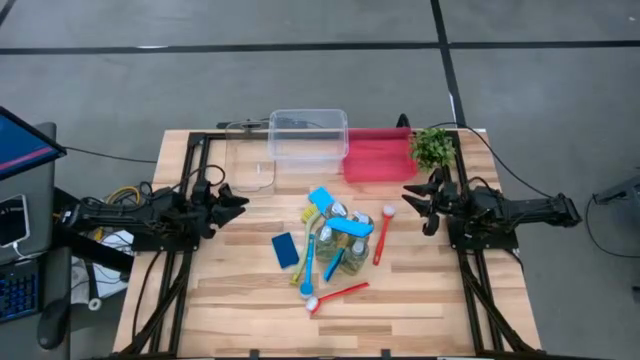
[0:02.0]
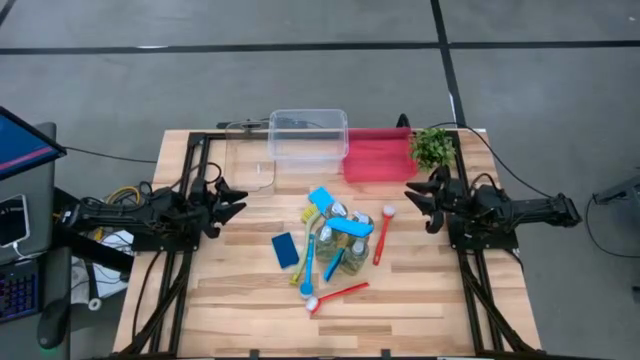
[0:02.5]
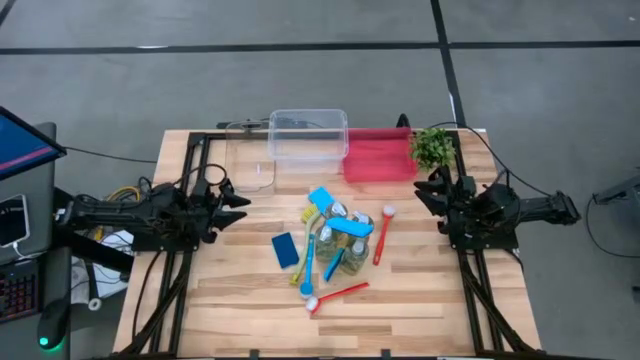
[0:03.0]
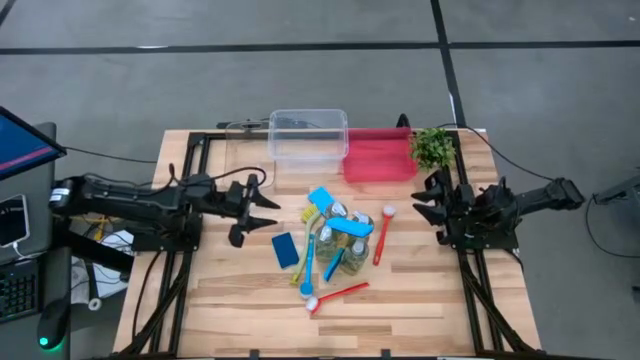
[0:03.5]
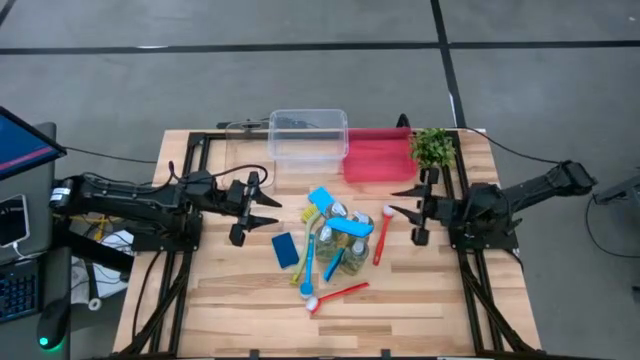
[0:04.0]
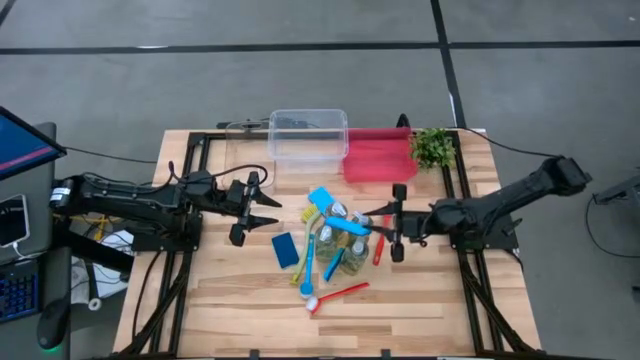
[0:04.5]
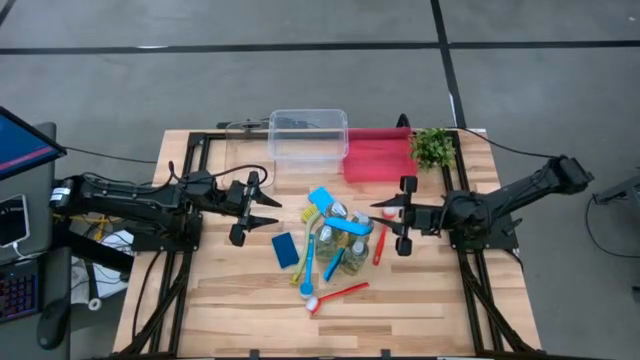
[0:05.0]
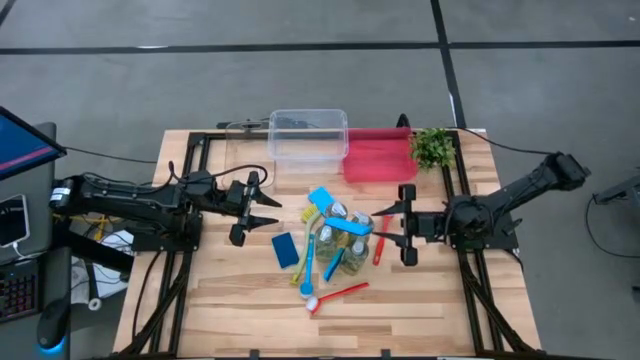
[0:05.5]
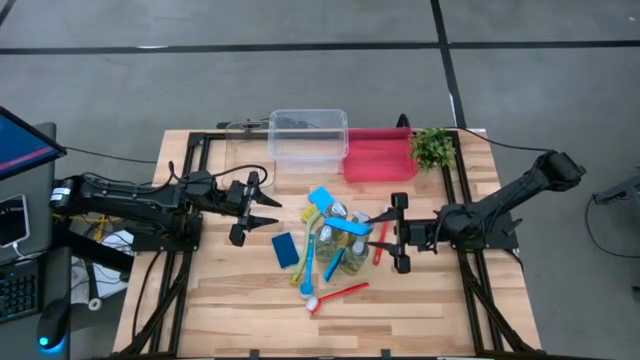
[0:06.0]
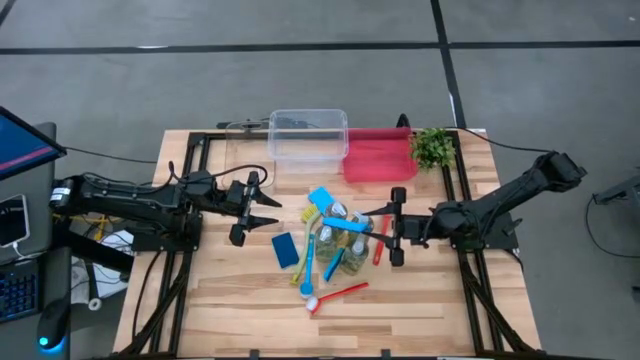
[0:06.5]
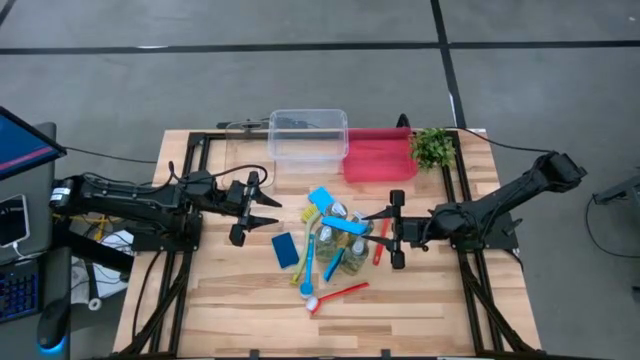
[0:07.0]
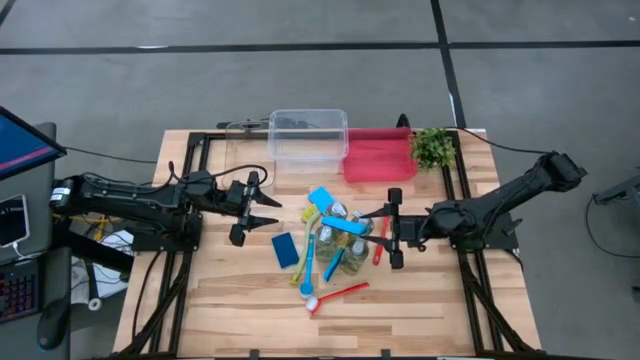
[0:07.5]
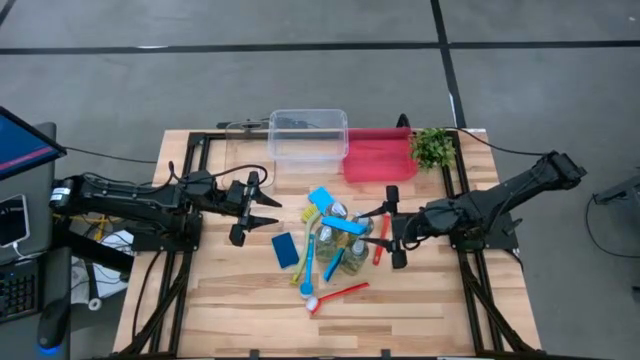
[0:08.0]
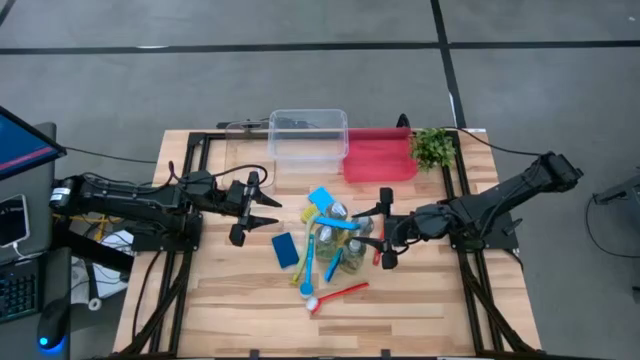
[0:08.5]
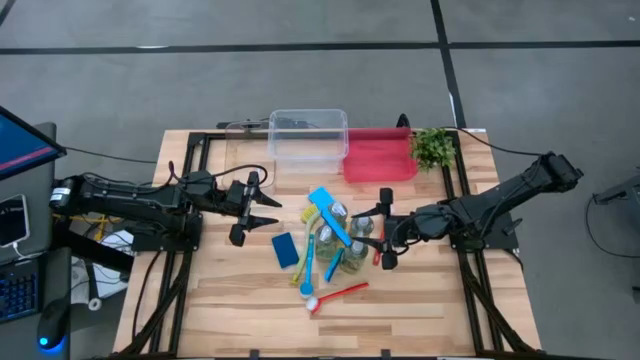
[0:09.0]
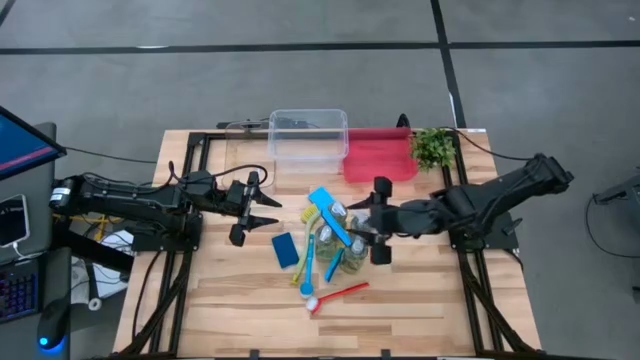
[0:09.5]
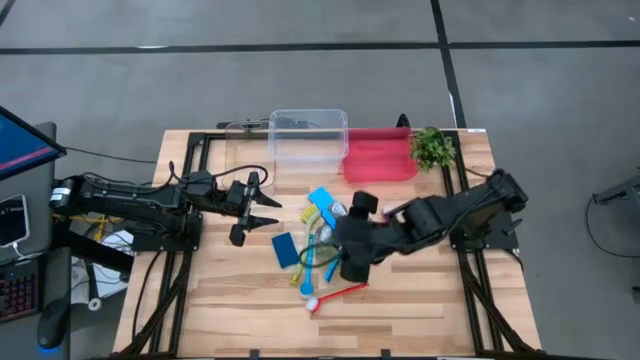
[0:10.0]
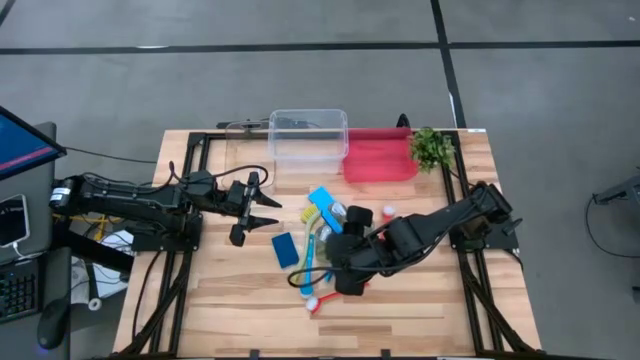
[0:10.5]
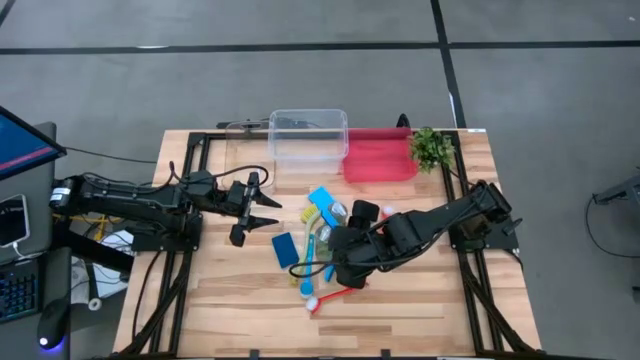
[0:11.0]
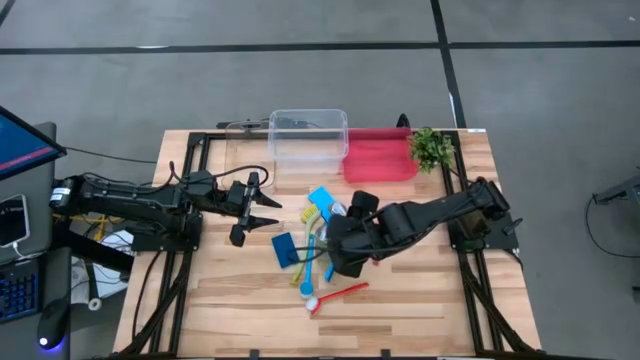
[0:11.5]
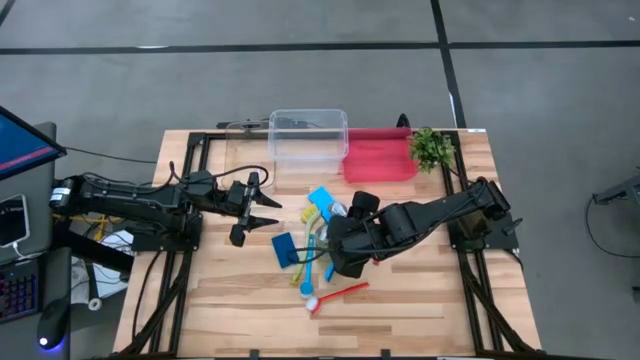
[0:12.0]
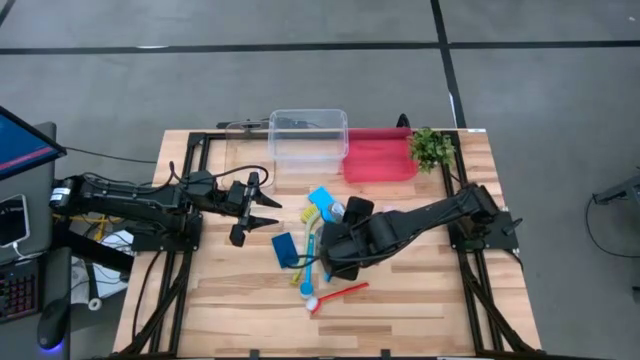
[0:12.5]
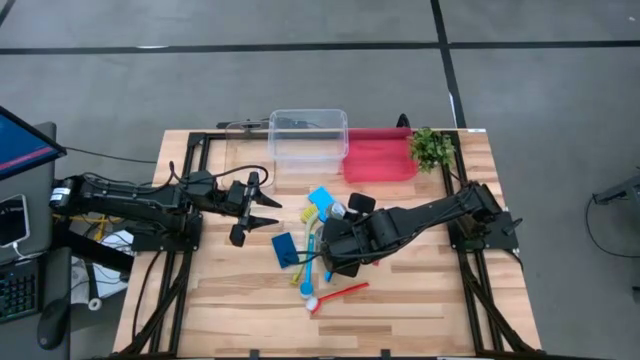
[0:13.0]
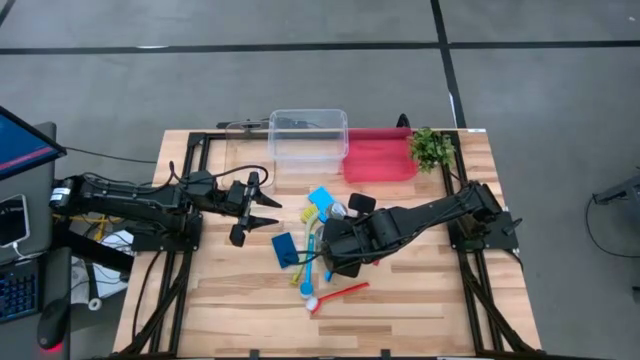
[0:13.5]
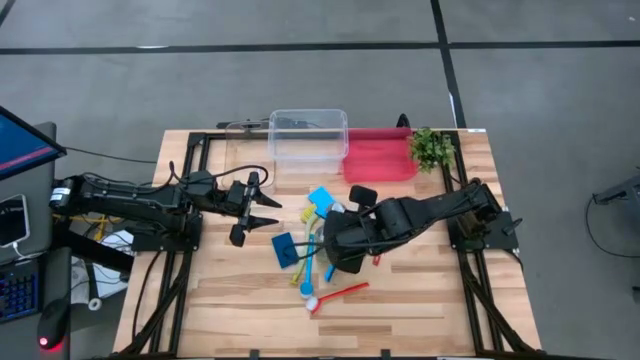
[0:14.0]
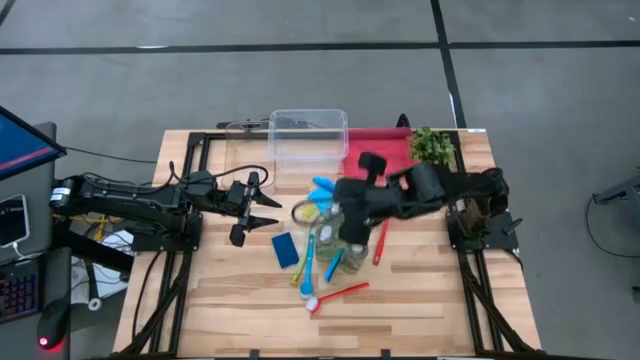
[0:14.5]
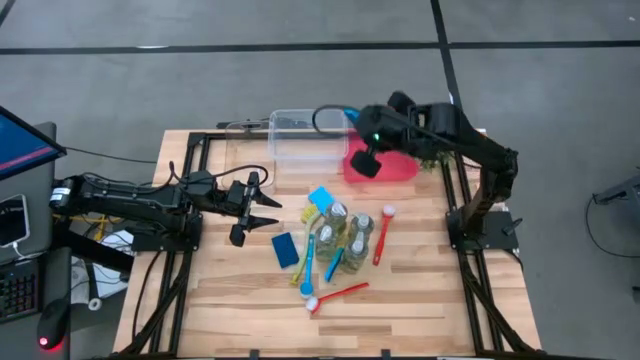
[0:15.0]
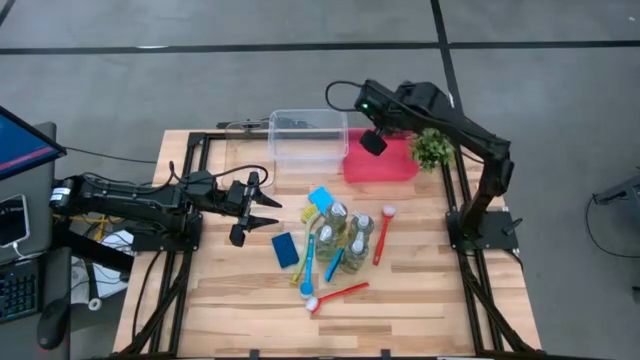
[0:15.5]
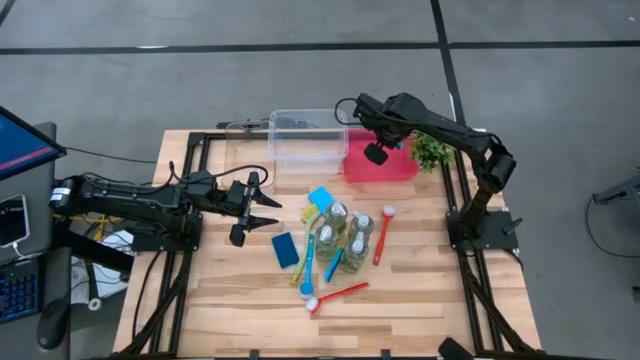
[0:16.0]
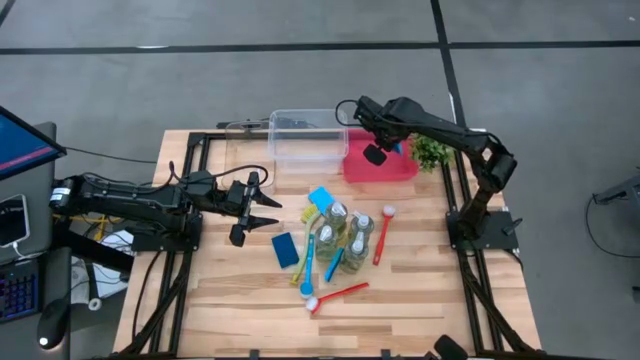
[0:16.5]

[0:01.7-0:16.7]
Task: Pick & Place Kitchen Sink Supplies
Put the blue sponge into the red bin

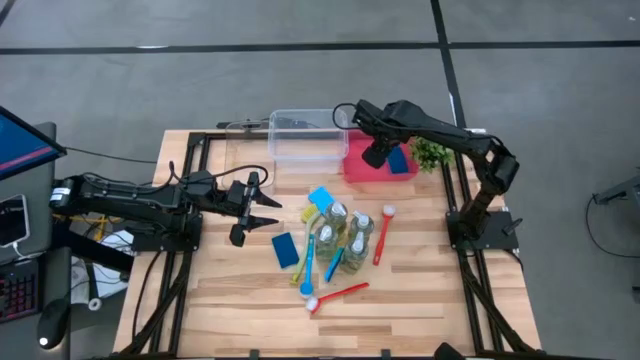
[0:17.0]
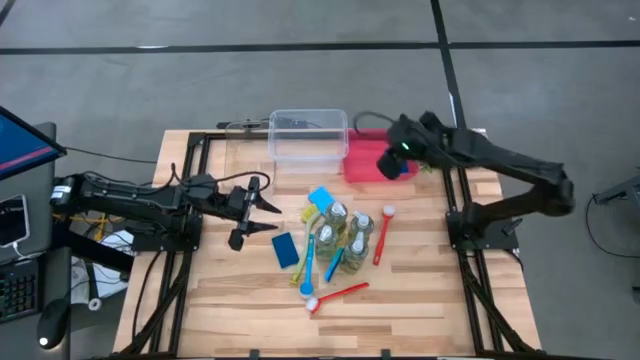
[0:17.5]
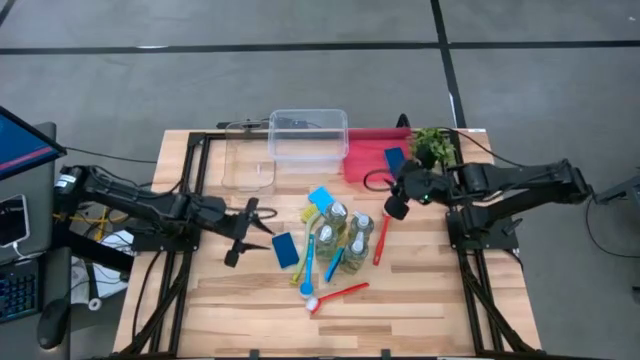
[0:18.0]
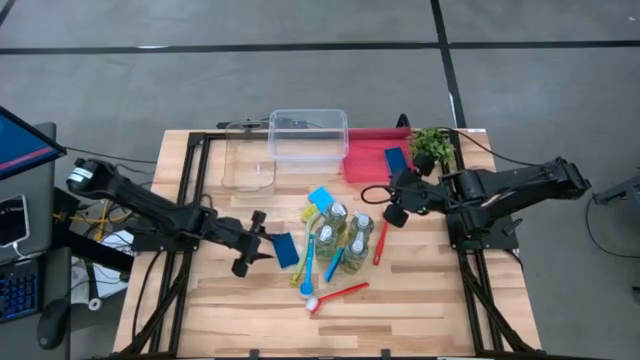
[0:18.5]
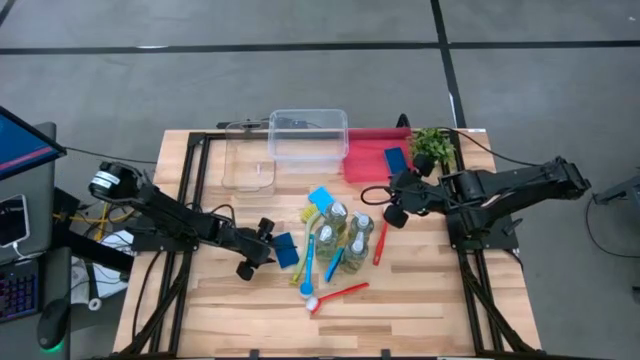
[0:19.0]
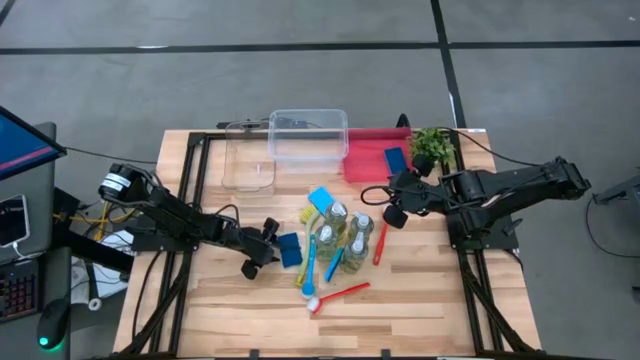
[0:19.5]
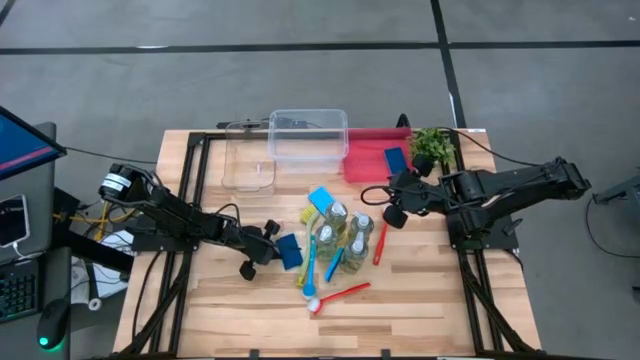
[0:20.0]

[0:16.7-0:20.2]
Put the blue sponge into the red bin

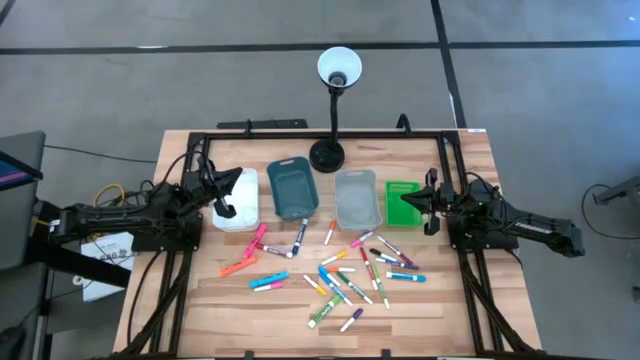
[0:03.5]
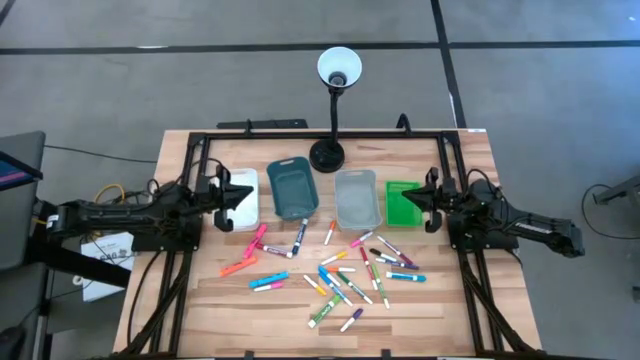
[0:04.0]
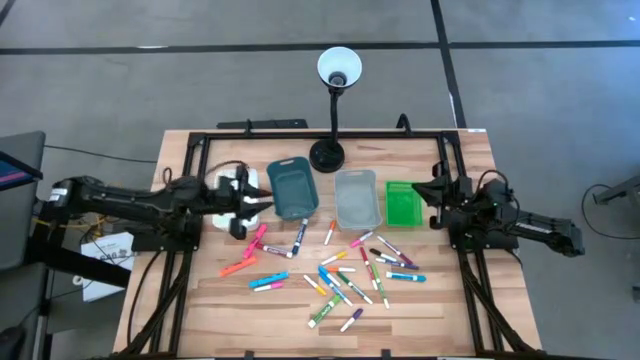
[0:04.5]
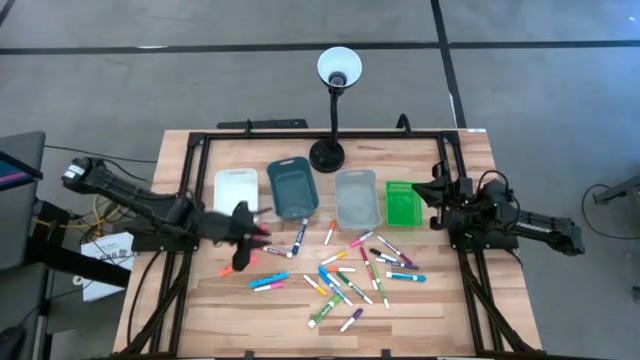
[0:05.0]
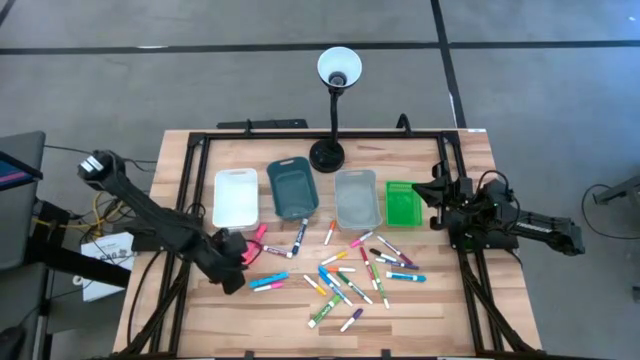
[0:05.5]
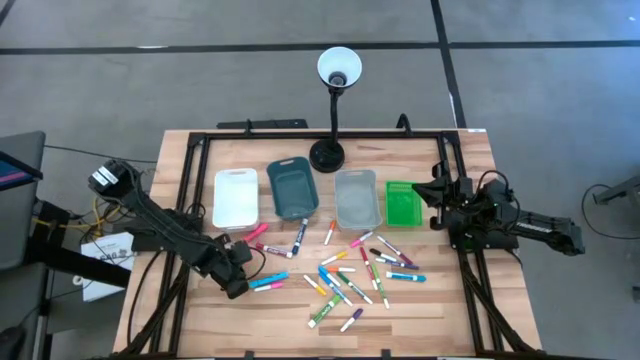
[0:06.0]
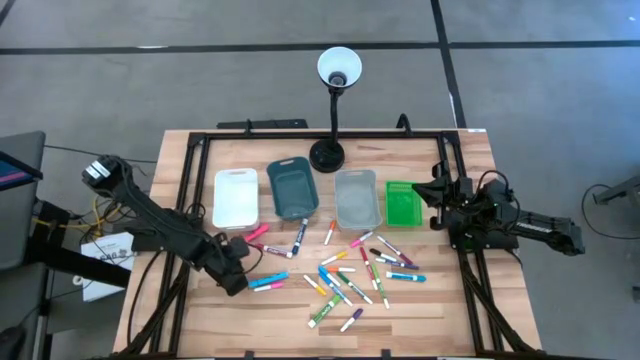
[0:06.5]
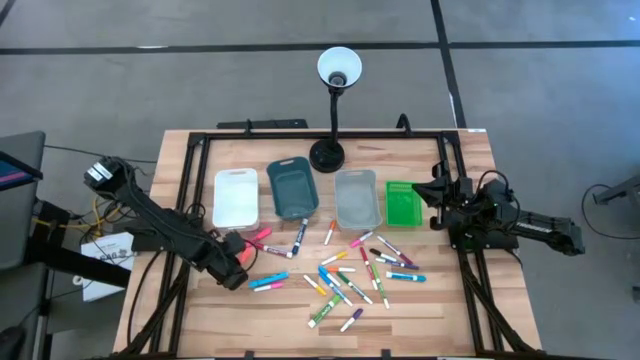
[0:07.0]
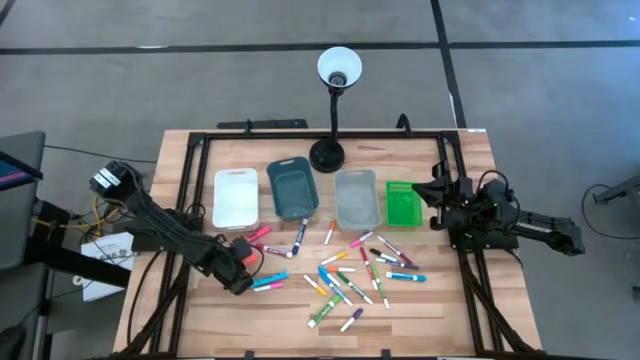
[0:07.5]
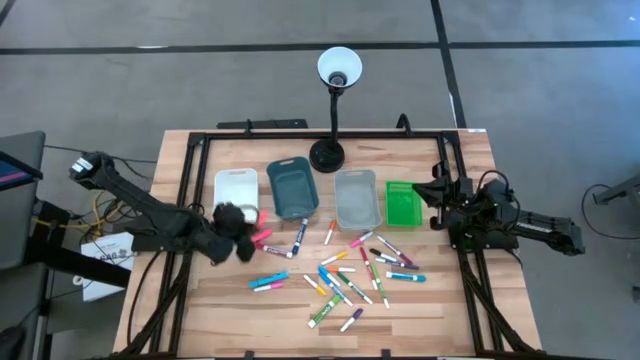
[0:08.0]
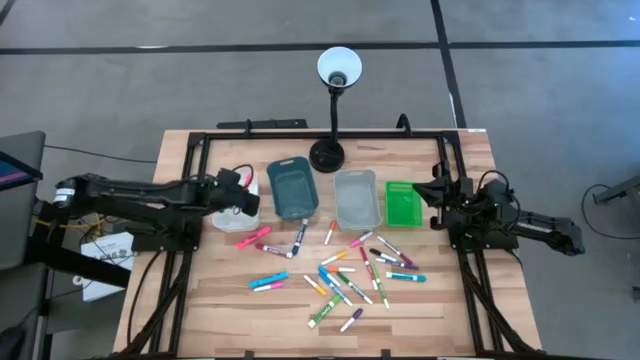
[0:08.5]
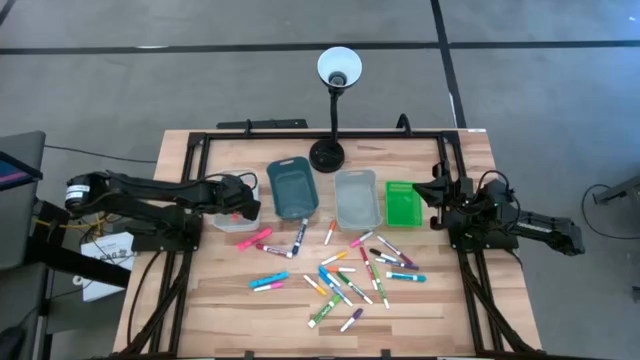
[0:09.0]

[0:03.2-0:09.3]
Task: Pick & Place Markers
Put the orange highlighter pen into the white bin
